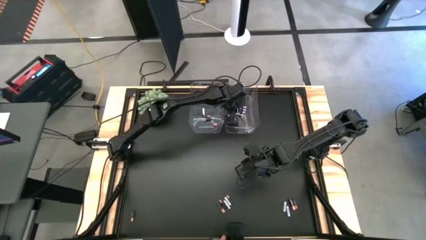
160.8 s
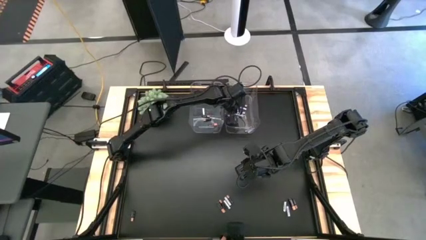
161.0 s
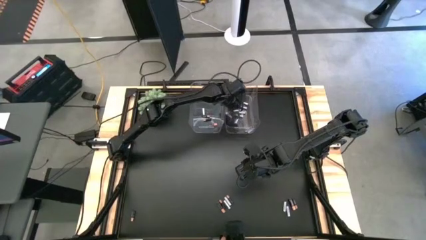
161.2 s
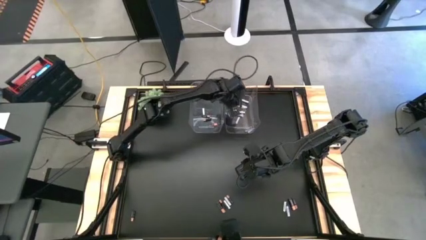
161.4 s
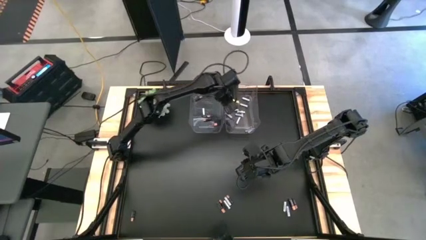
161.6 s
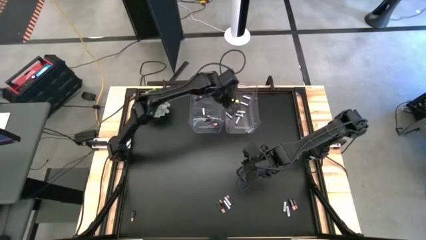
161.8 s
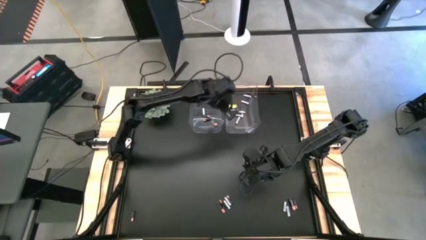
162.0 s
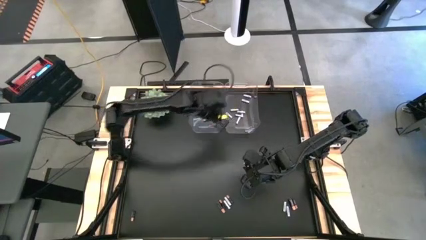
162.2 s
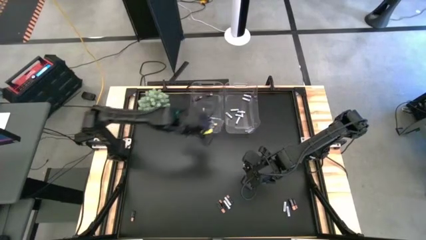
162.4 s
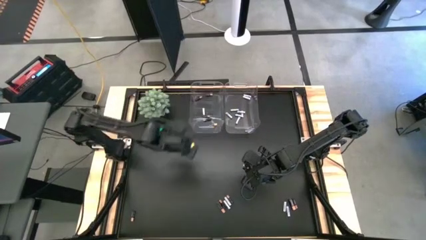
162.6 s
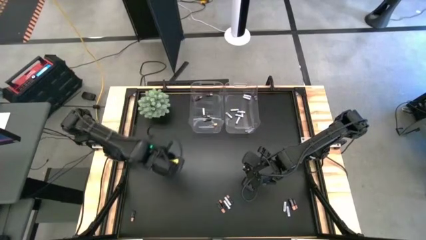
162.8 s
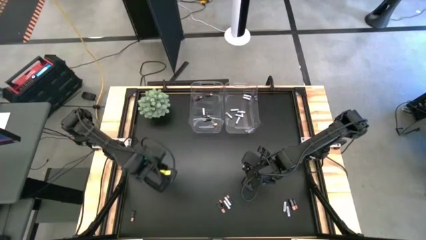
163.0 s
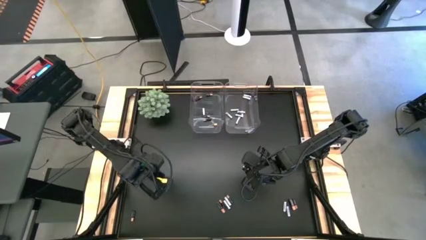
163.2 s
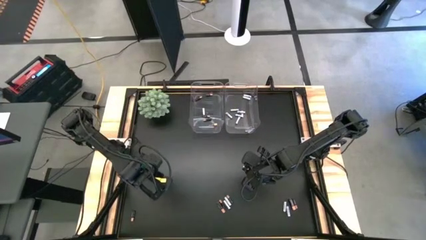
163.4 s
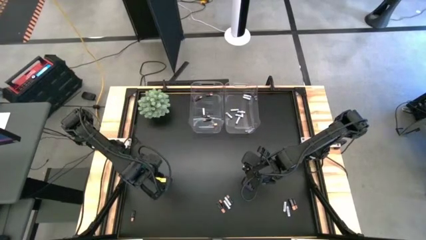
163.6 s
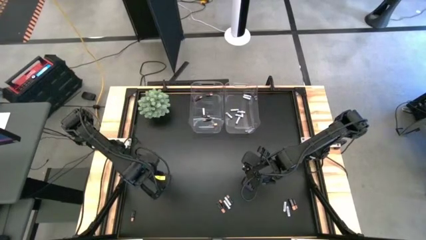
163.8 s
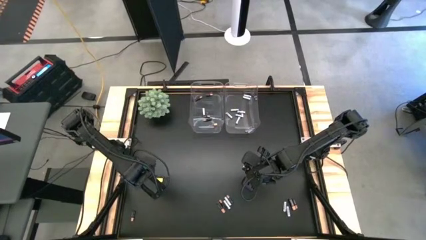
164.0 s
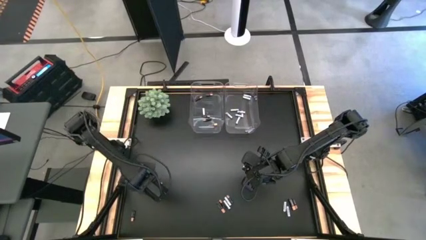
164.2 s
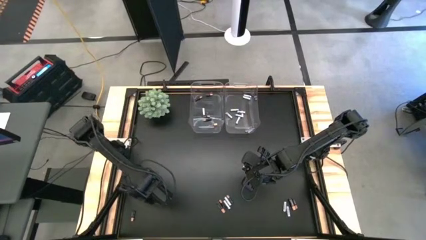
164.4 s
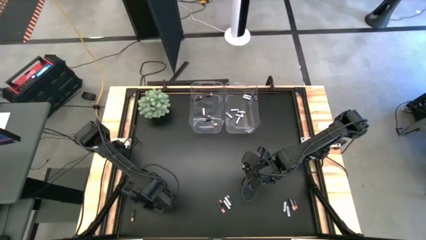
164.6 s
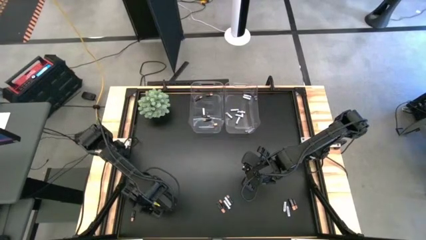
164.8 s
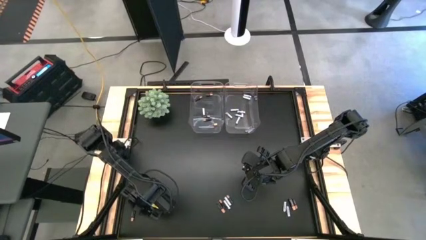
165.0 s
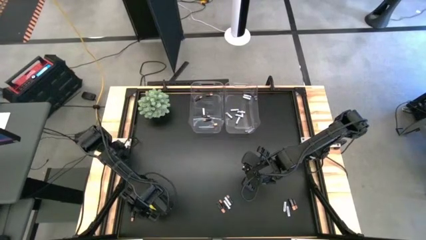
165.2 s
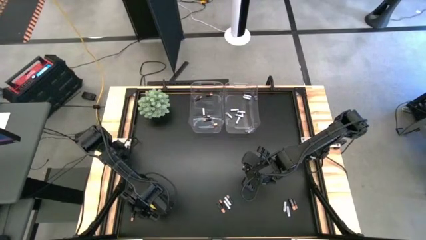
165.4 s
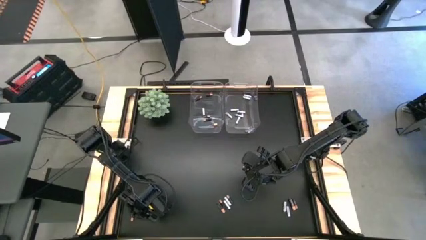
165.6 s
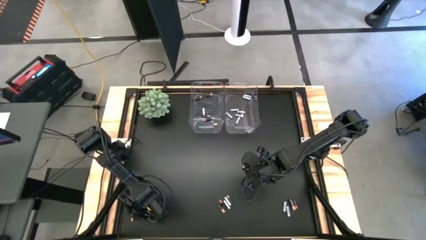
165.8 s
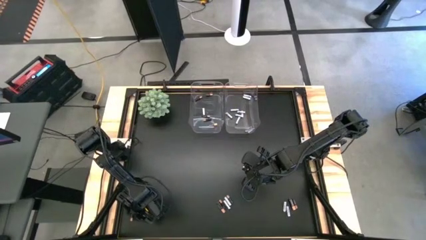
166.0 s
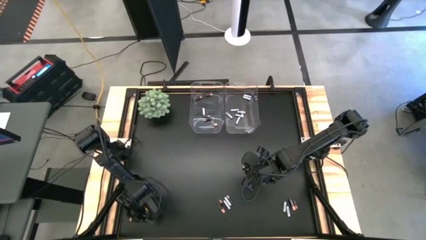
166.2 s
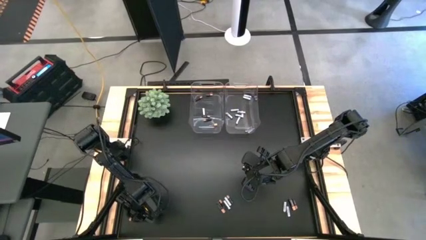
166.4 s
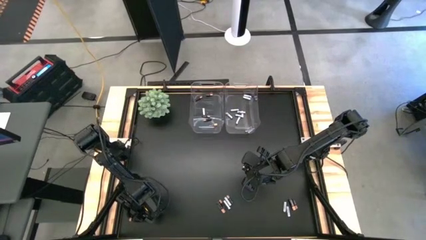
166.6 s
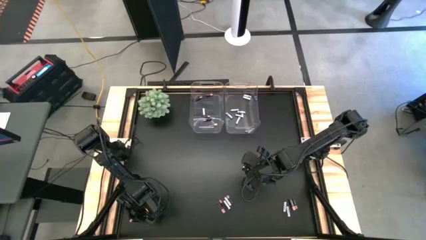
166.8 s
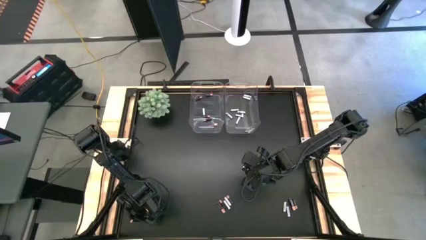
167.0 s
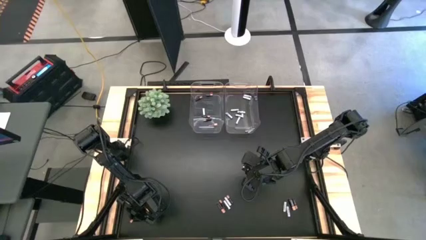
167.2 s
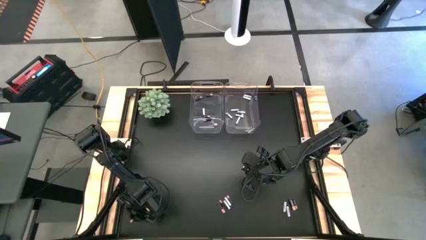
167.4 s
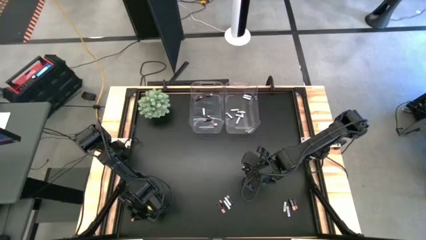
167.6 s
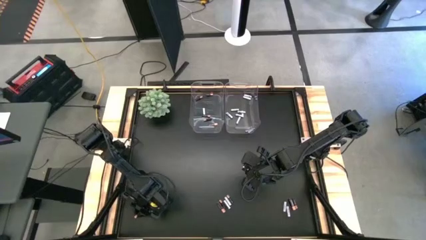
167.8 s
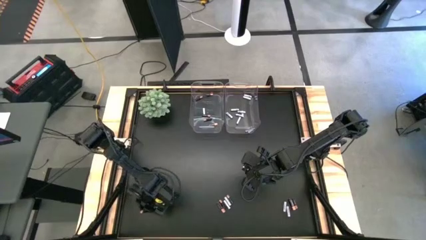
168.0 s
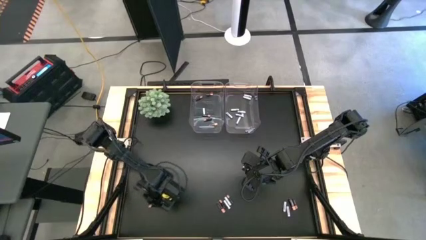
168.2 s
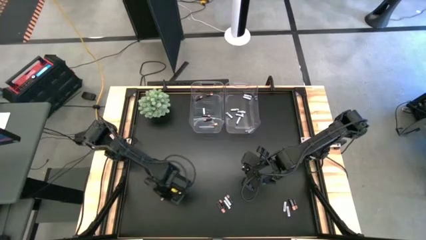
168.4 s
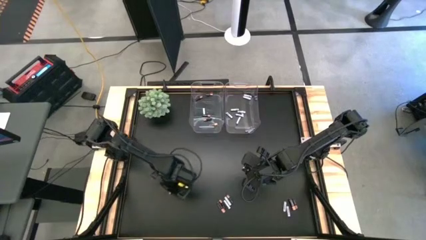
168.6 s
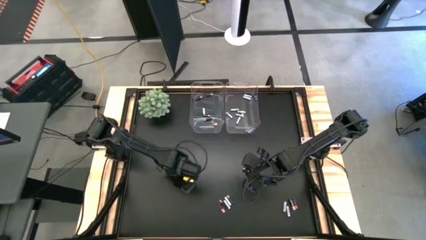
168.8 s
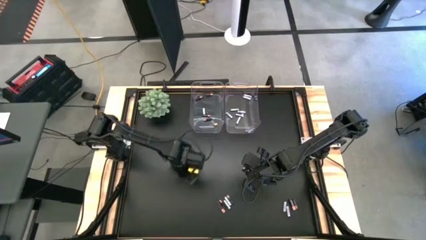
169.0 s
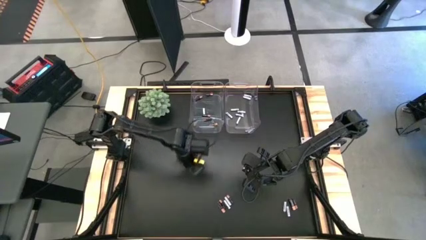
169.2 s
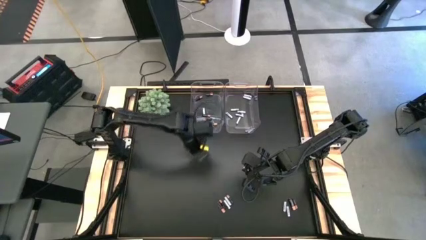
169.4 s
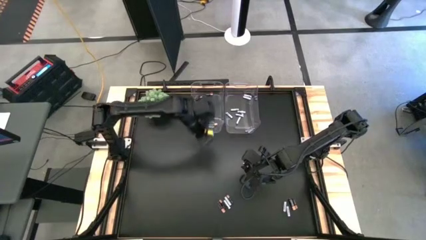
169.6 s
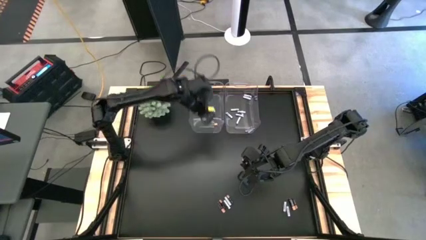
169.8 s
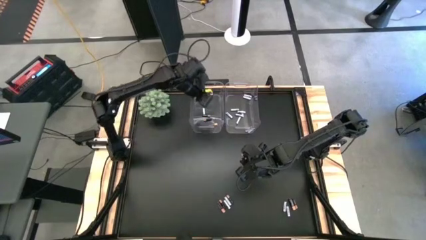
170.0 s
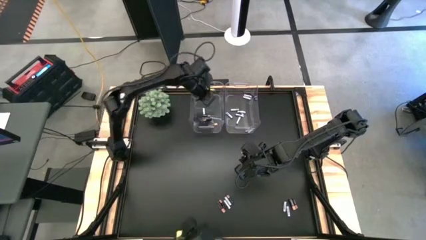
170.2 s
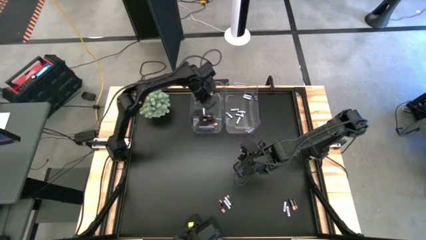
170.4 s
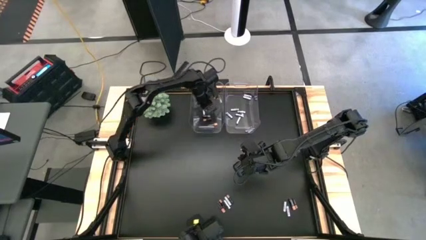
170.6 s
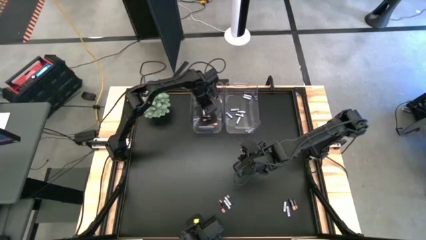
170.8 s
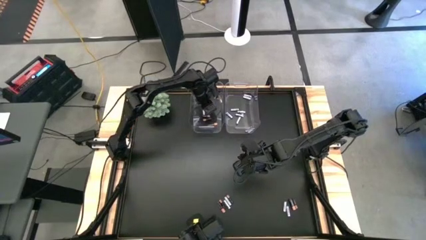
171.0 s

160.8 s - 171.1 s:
Task: Sort batteries
Put the large black battery into the left transparent bin

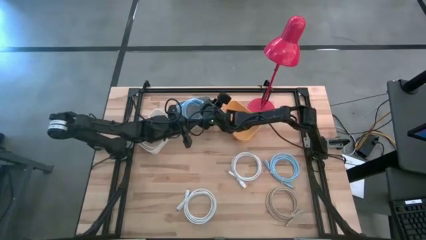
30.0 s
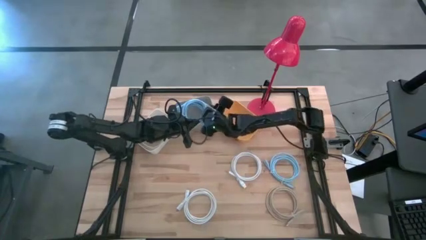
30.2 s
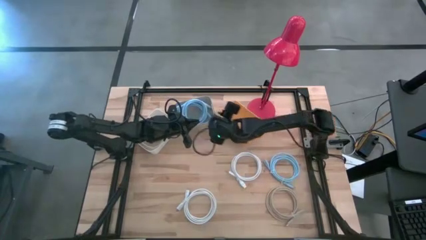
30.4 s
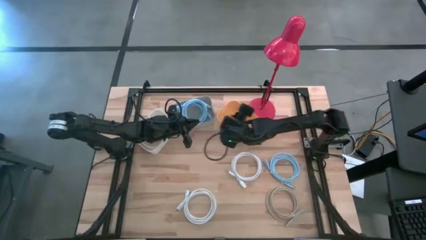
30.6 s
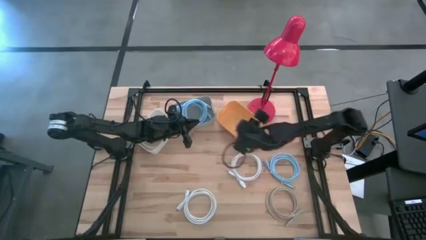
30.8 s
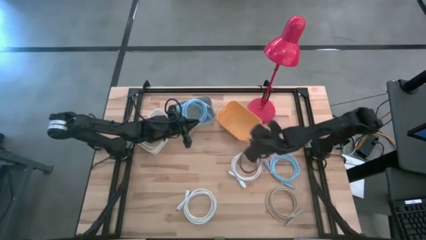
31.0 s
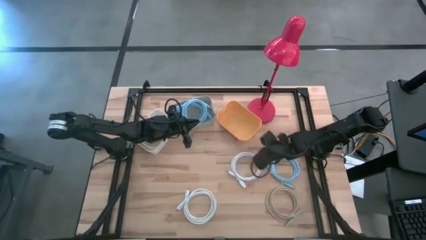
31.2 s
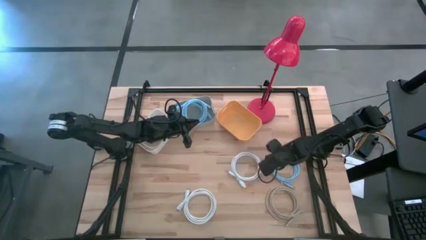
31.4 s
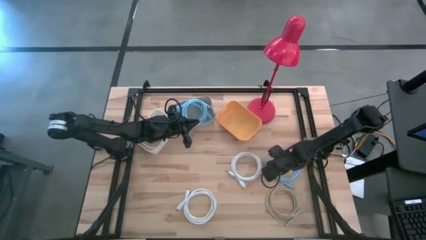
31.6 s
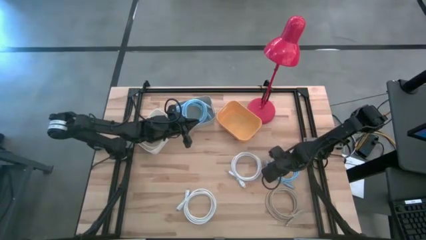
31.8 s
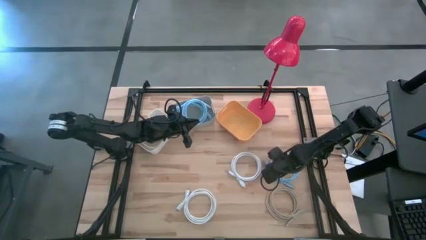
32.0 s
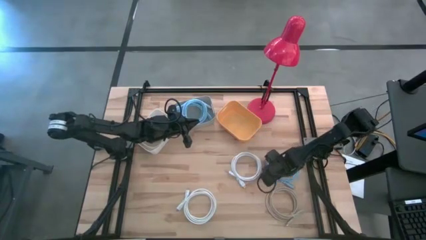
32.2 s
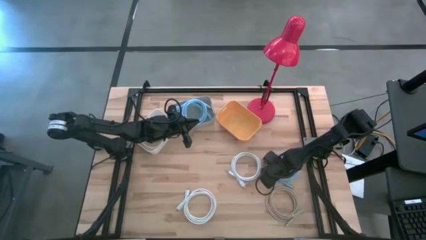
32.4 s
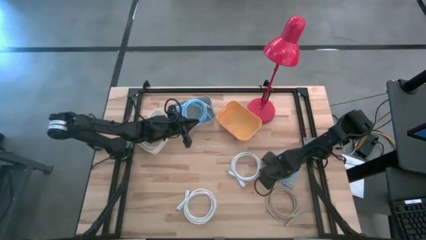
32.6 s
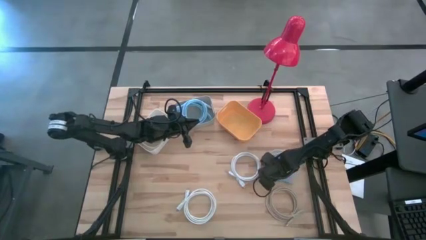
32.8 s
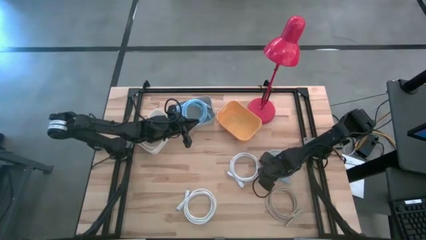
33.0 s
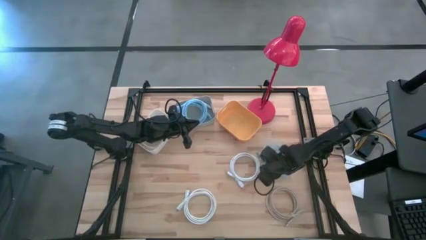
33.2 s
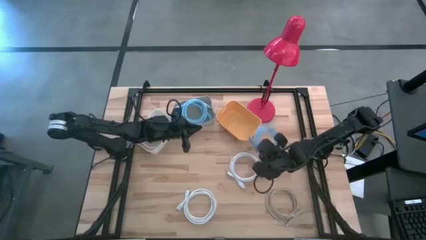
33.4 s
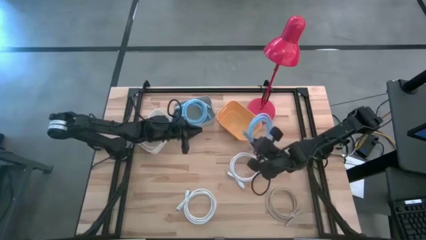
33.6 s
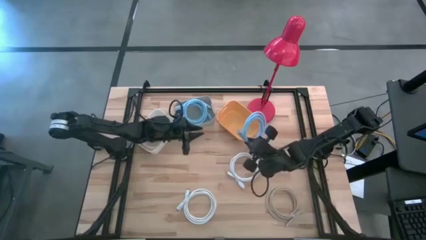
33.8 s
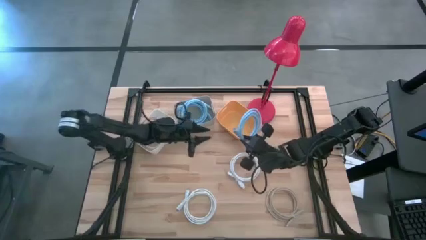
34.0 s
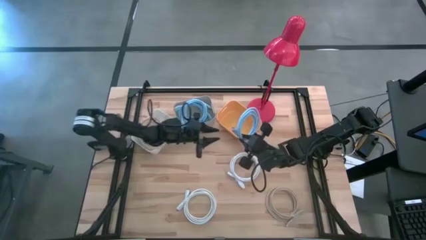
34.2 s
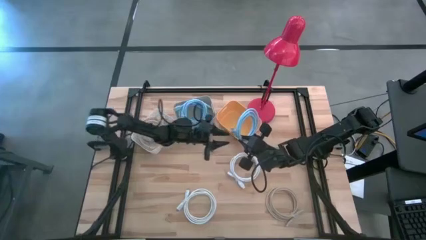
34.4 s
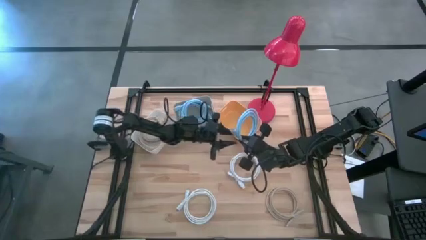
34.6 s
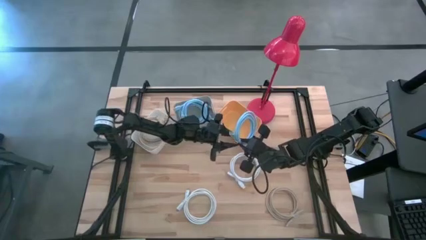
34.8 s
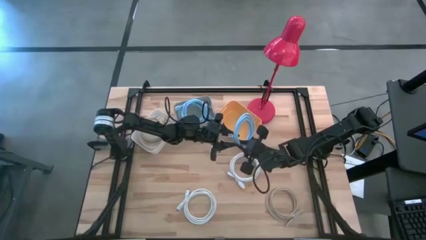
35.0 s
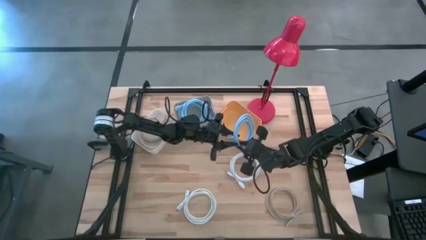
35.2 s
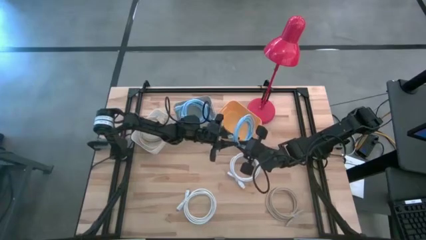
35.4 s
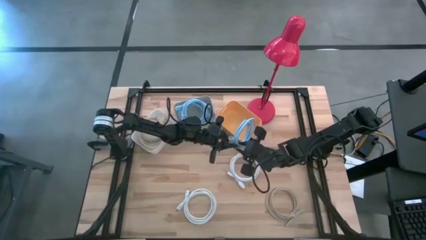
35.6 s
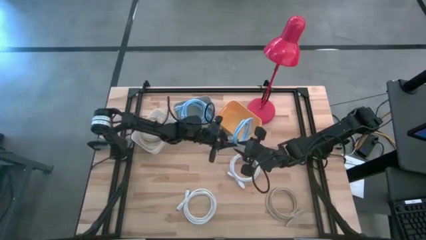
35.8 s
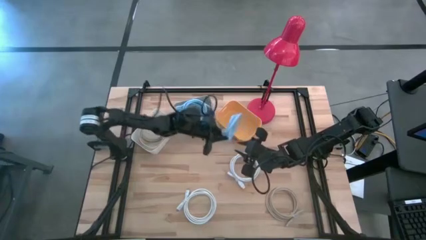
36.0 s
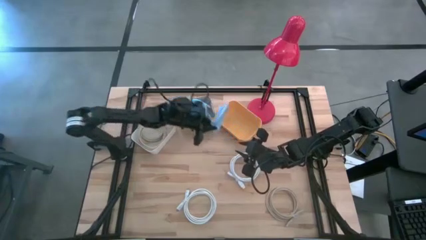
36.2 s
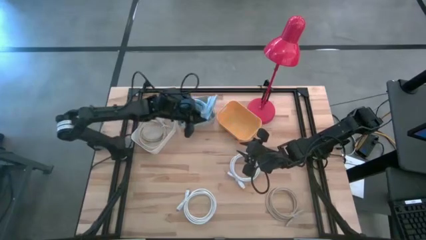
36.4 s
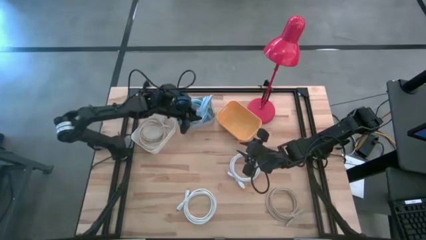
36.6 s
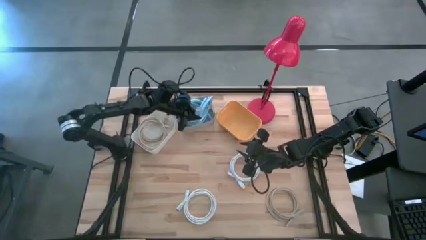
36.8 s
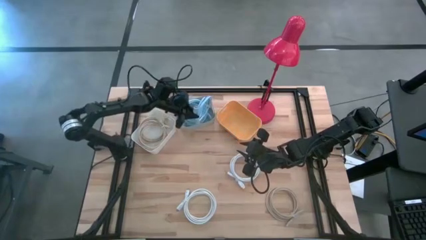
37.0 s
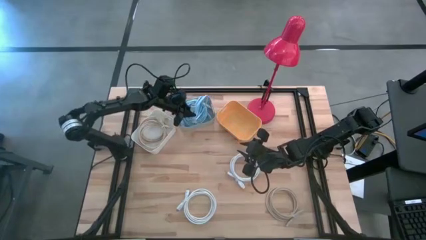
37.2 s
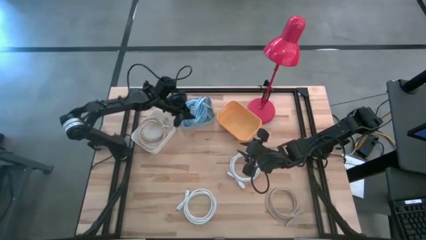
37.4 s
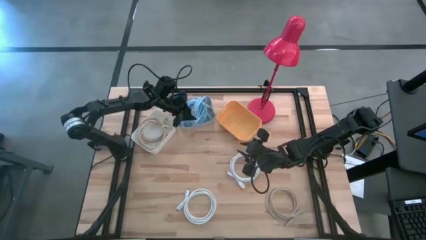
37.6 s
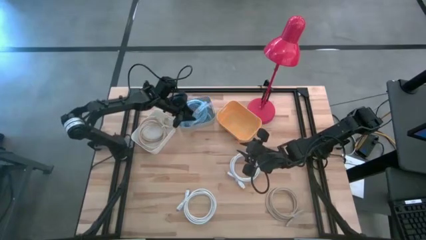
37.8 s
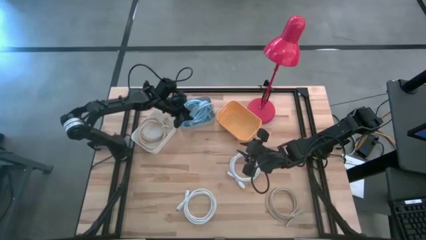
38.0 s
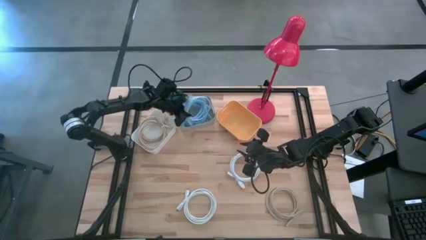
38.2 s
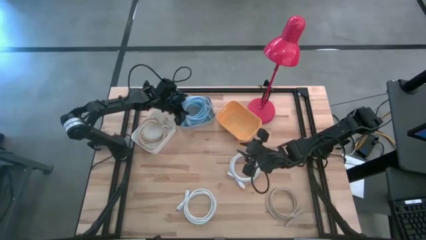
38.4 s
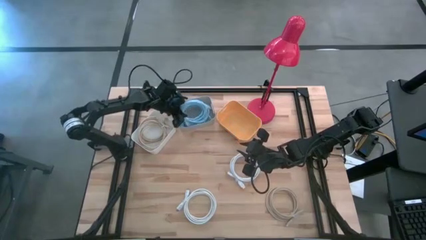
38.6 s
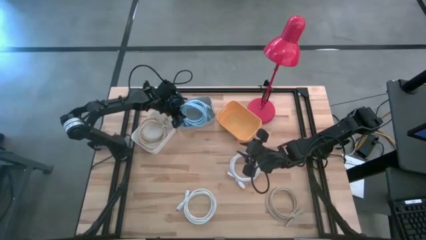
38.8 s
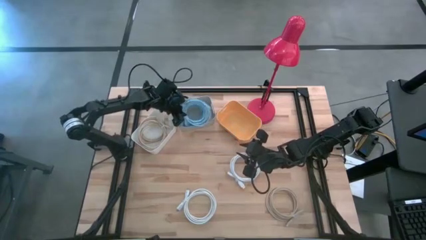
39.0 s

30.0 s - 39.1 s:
Task: Sort HDMI cables
Put the light blue hdmi cable into the gray bin
